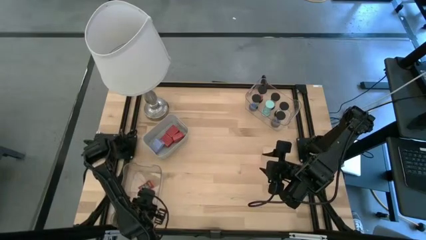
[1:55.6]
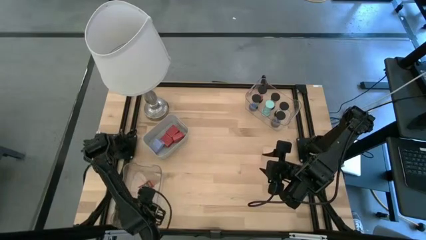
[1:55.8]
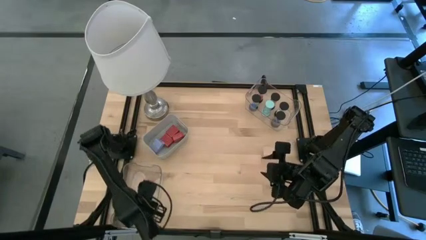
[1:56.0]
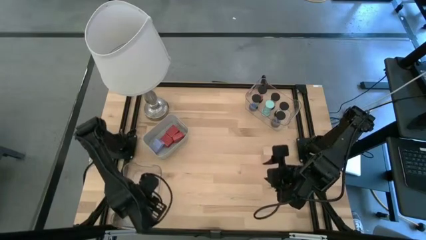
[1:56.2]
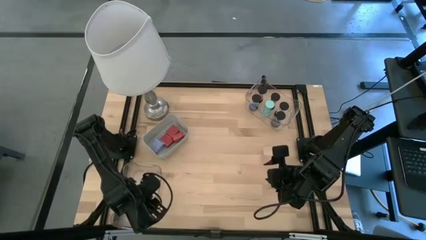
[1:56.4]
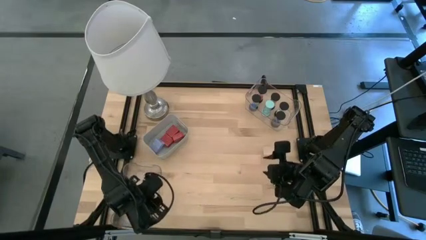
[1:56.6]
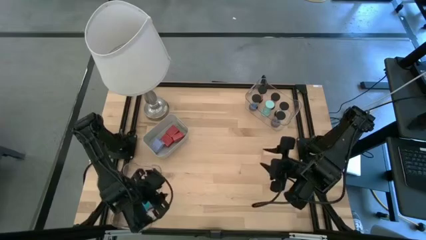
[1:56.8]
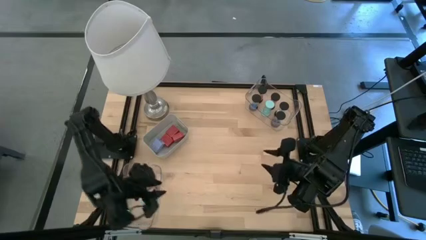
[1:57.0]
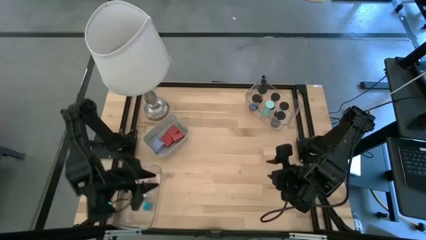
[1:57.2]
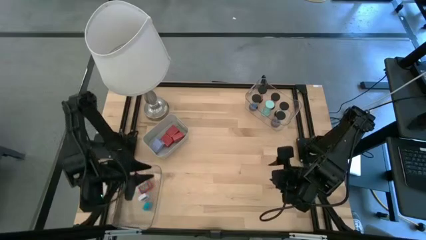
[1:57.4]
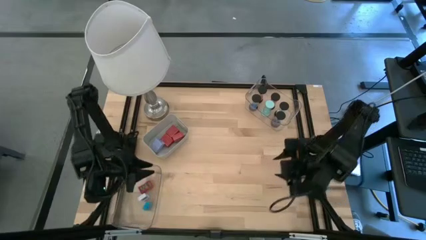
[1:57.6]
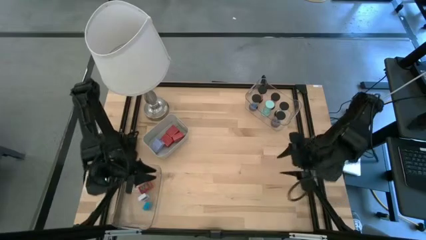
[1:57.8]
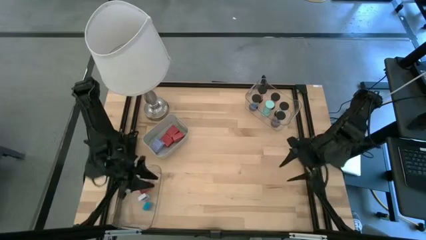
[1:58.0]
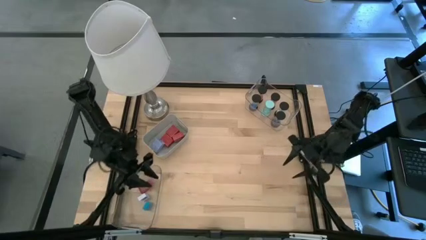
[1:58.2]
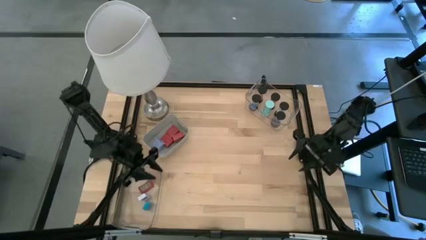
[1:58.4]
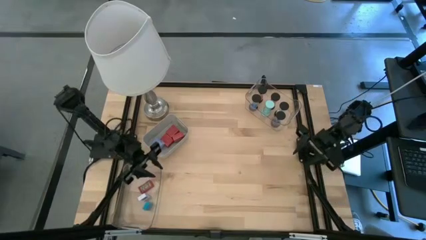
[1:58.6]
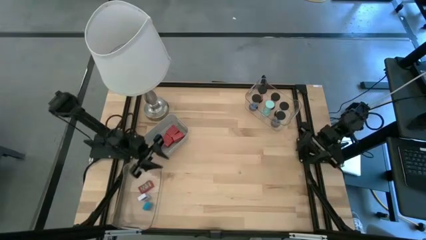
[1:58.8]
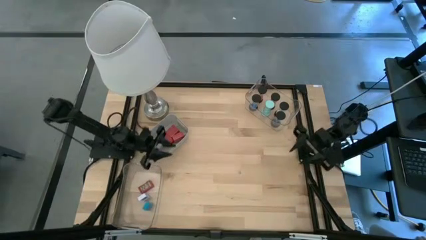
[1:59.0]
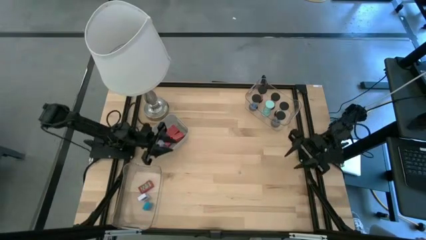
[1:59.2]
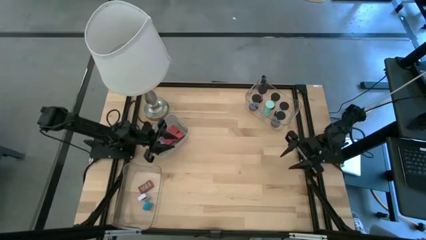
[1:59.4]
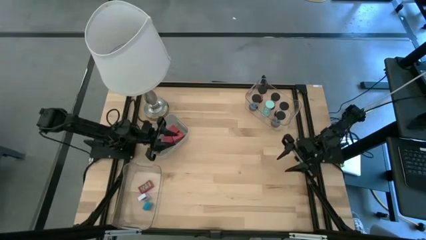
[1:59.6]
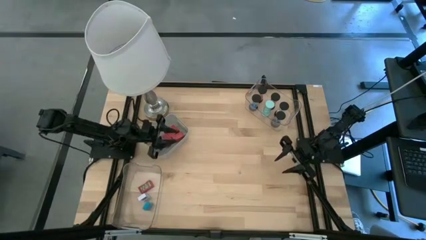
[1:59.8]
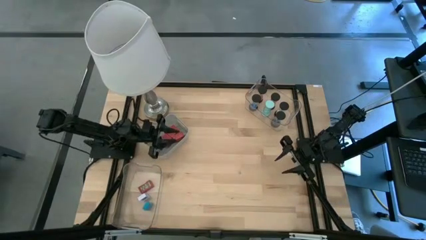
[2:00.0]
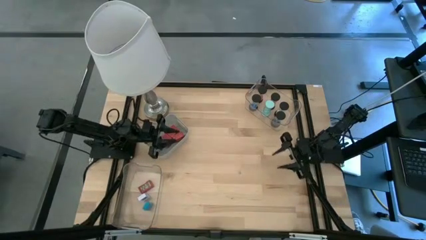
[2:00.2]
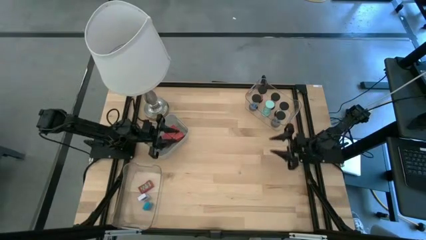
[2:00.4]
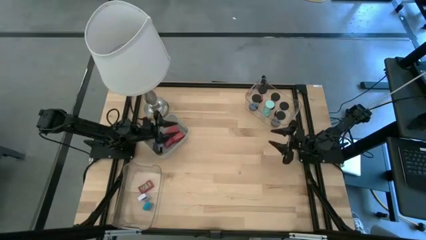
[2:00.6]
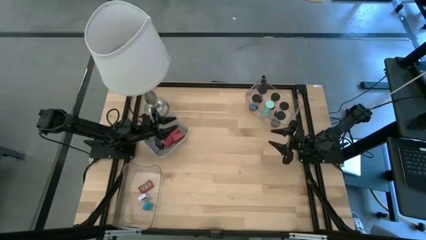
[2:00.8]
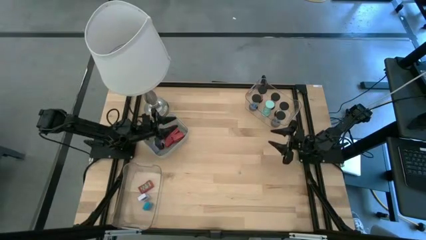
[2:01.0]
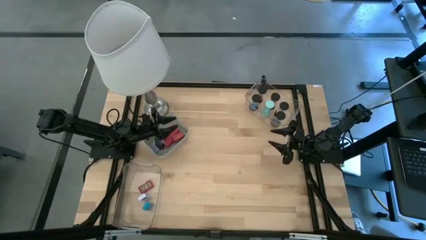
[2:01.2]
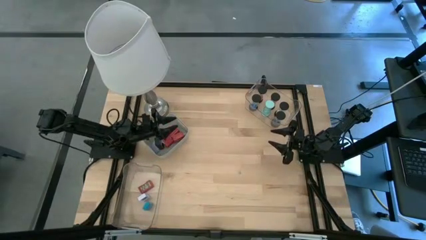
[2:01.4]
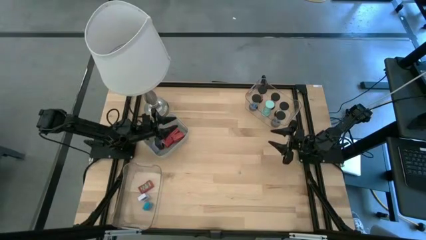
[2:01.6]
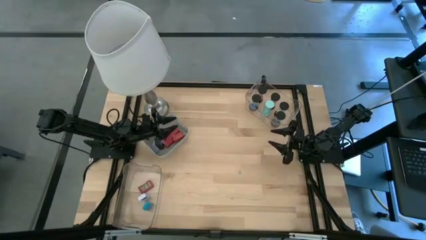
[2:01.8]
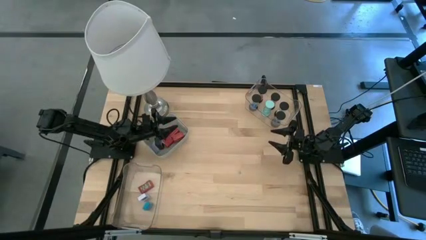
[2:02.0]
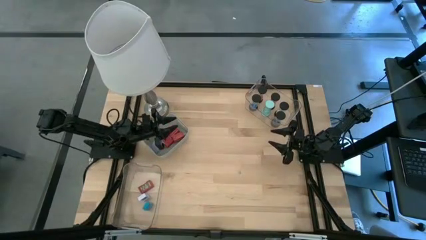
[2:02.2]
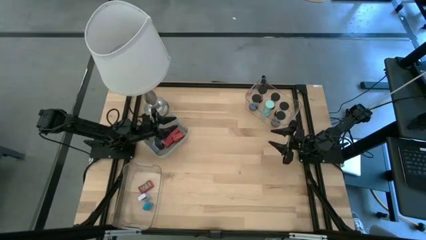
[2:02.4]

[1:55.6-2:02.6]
Task: Pick & Place Office items
Return to Home Position

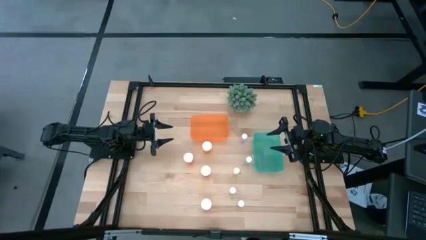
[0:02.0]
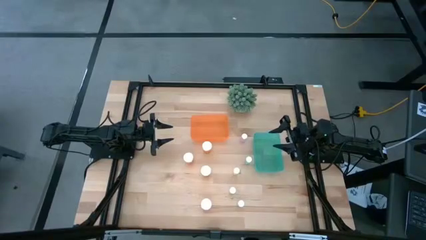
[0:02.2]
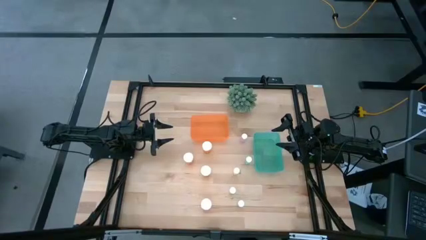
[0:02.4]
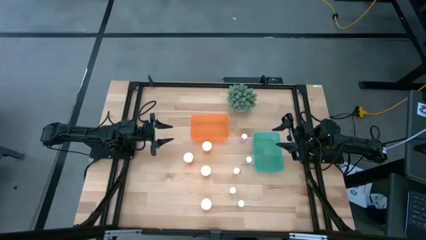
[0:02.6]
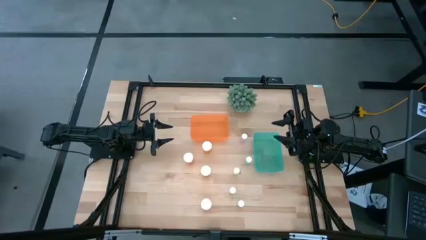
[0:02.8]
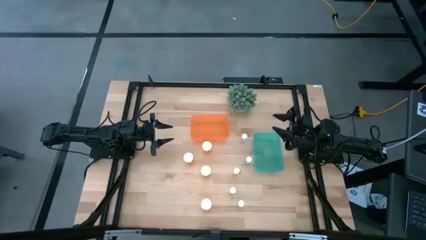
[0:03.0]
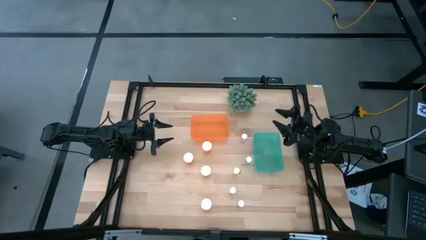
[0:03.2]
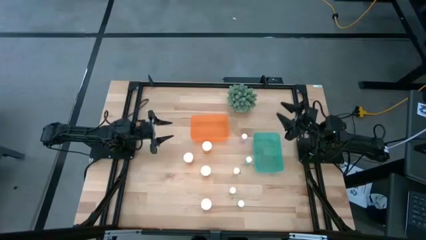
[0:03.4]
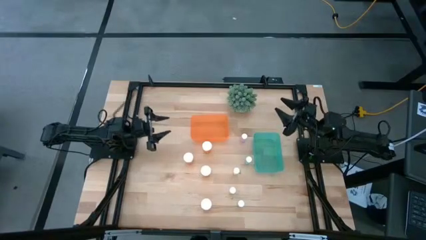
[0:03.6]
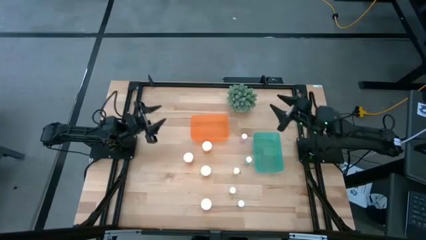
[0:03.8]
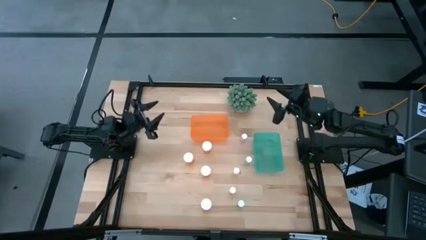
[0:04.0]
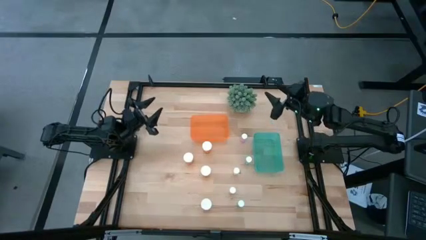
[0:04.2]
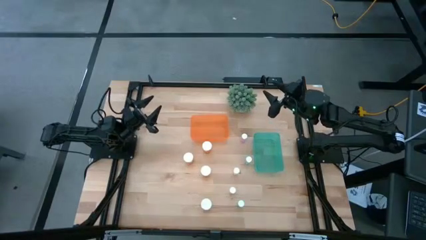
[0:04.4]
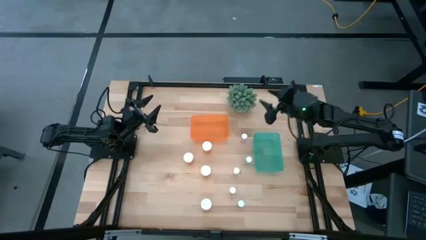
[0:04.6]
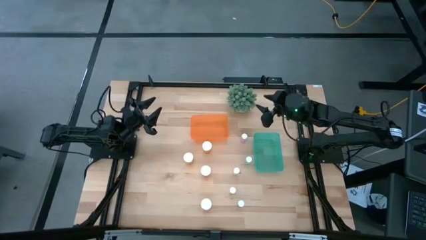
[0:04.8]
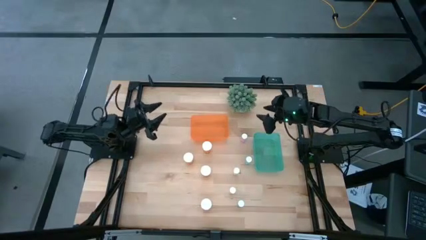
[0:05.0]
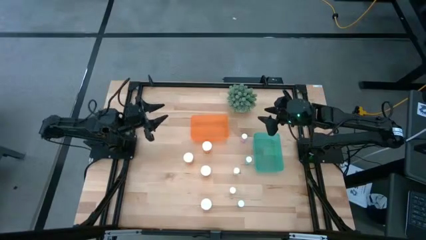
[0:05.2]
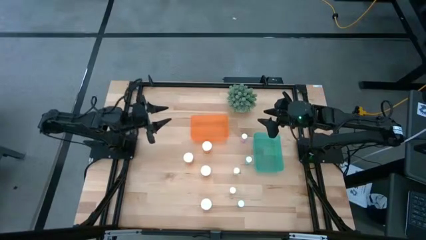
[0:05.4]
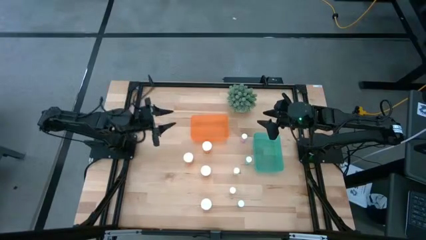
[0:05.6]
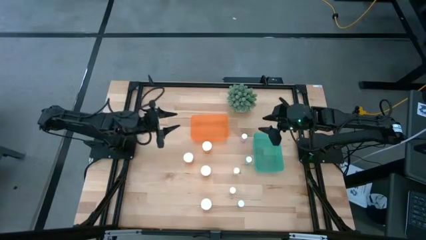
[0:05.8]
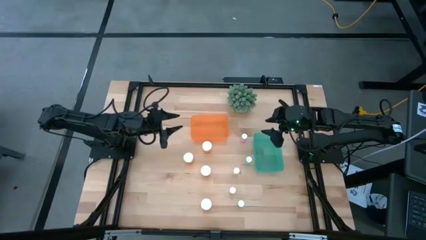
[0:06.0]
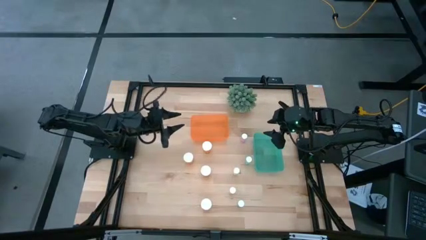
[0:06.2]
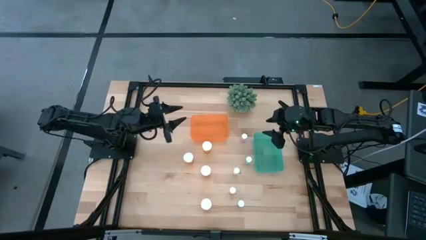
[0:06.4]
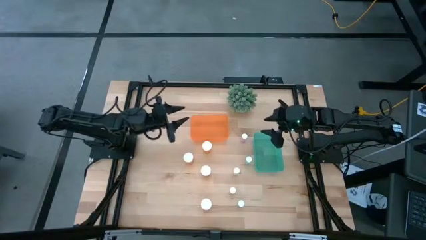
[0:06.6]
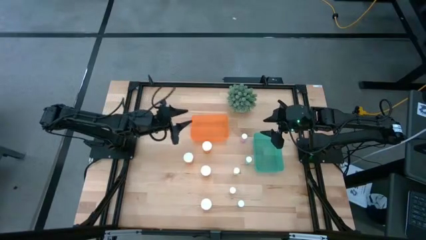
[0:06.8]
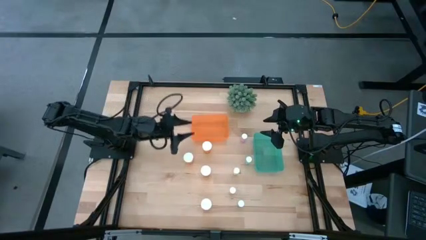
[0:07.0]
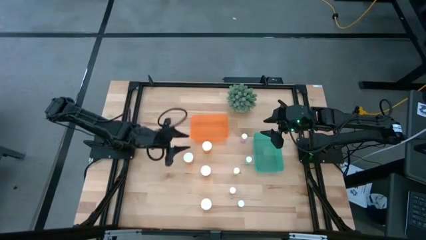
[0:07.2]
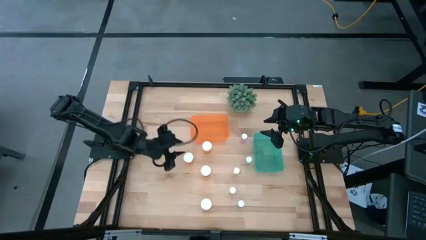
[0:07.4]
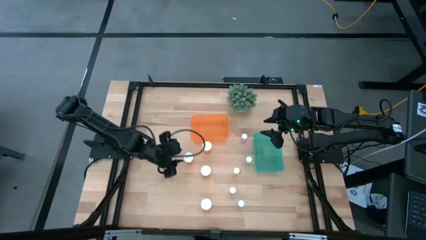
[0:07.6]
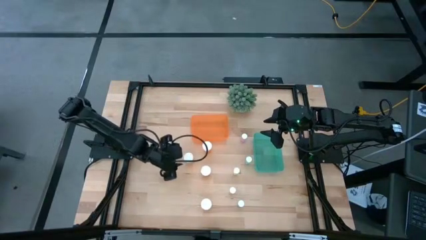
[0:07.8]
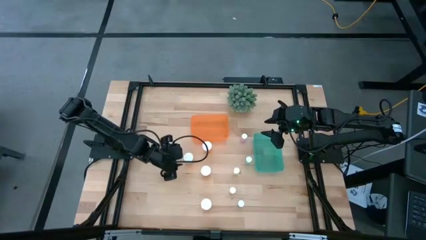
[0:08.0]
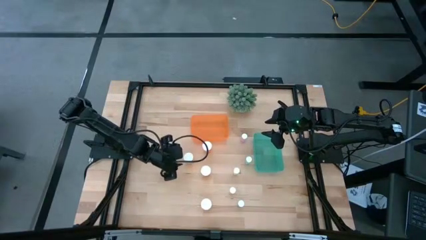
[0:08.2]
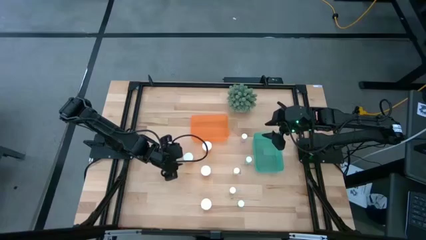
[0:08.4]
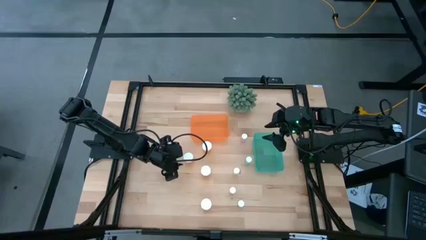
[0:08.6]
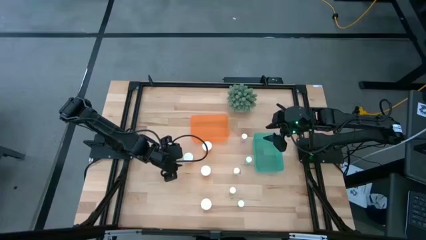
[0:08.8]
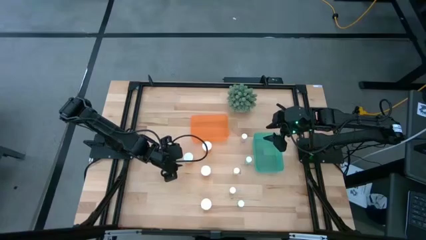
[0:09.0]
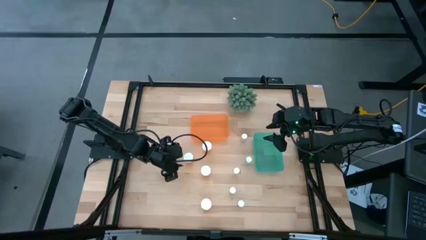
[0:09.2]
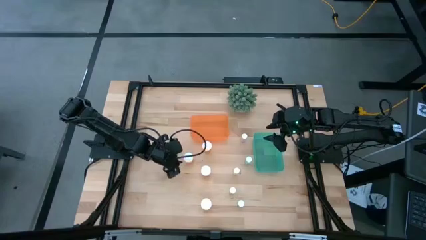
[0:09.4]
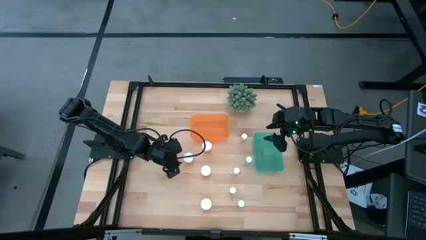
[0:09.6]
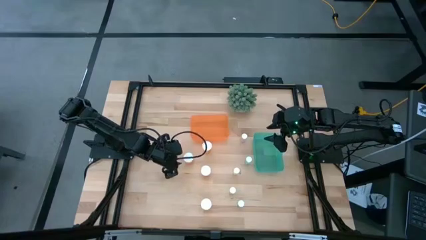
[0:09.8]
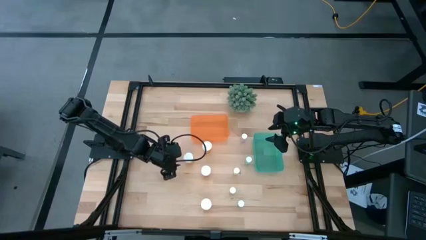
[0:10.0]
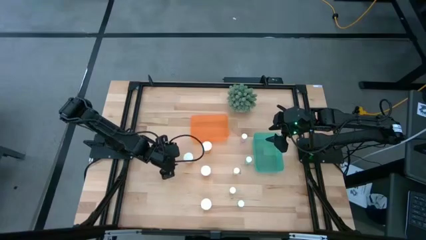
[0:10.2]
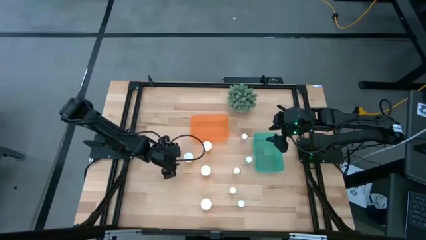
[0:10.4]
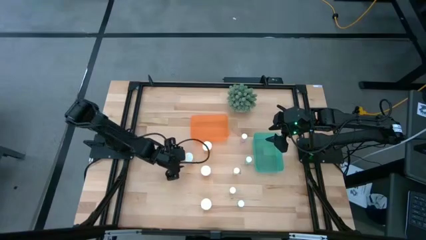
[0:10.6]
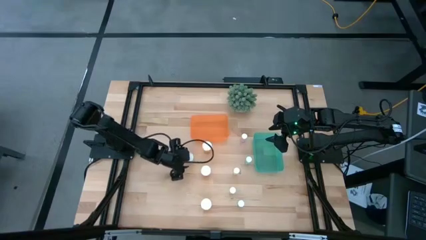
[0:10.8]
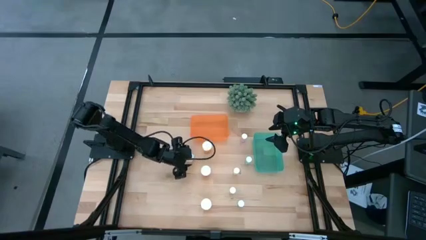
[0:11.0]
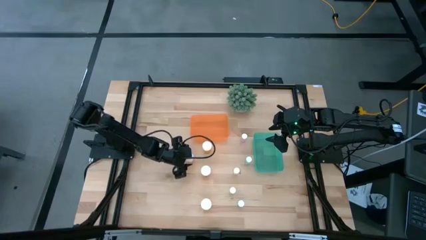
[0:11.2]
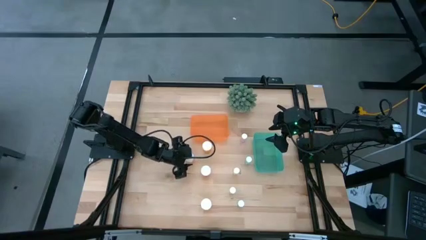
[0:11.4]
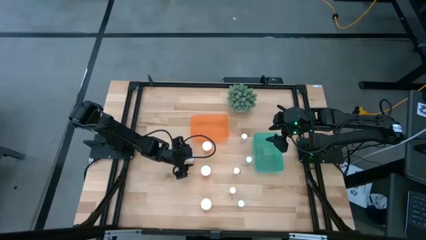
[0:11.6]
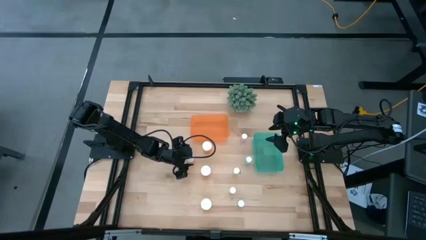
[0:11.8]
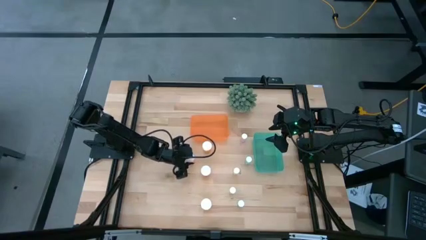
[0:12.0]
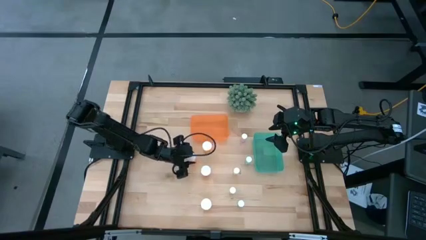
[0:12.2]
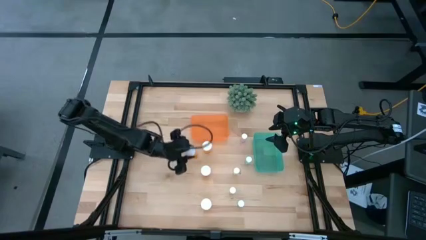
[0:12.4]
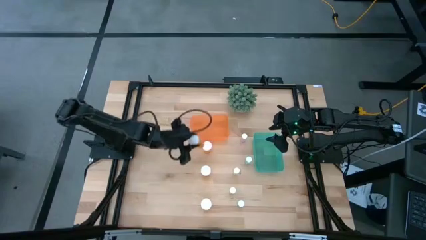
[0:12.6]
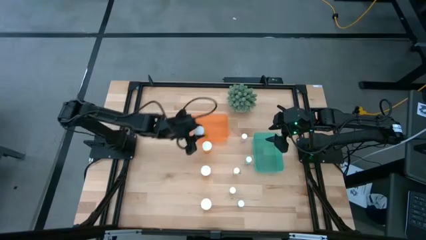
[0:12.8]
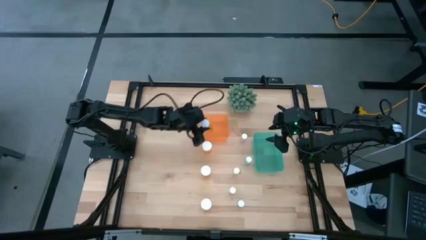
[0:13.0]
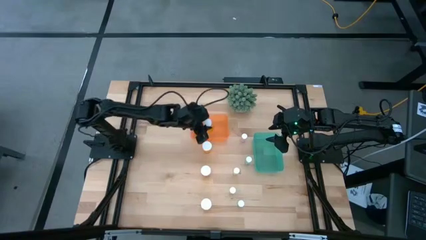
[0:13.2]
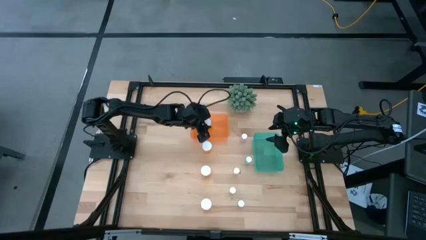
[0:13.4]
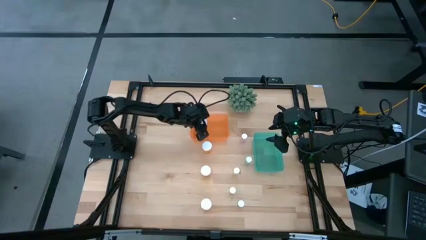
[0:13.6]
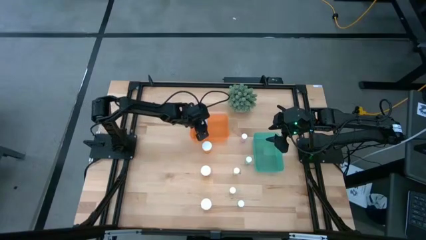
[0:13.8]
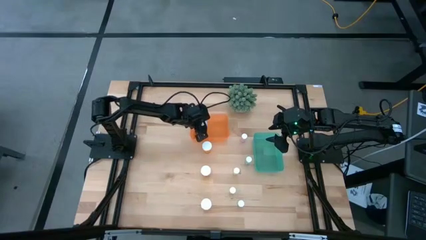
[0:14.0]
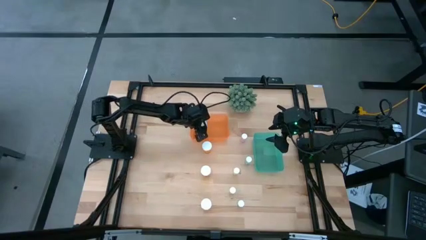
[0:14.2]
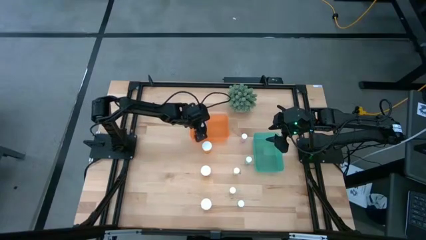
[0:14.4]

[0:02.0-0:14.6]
Task: Pick and place medicine bottles into bin by pill shape (circle, oval)
Put the orange pill bottle into the orange bin
